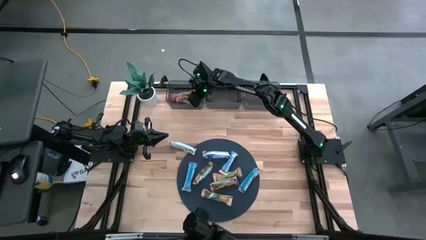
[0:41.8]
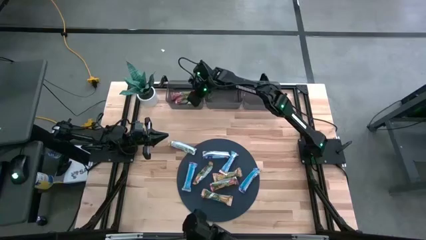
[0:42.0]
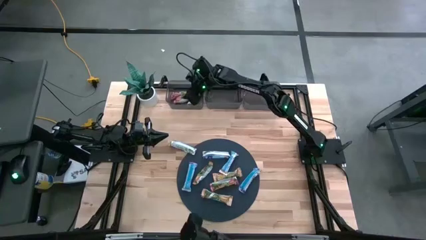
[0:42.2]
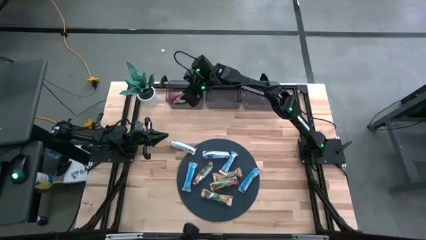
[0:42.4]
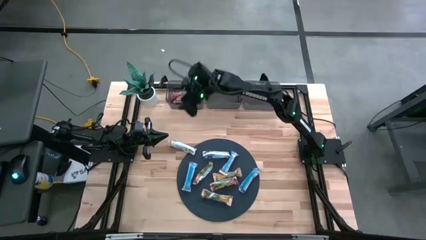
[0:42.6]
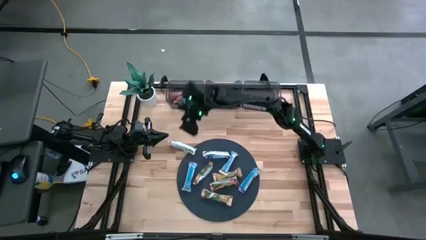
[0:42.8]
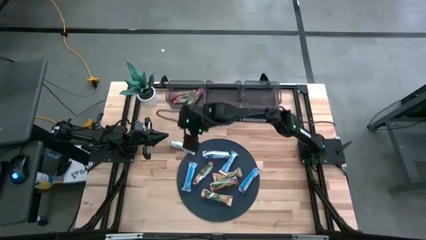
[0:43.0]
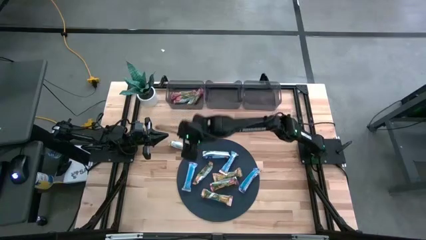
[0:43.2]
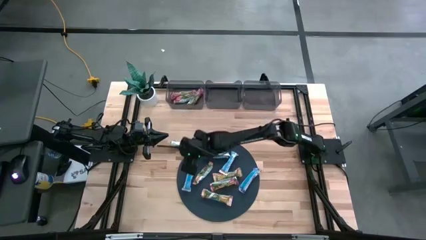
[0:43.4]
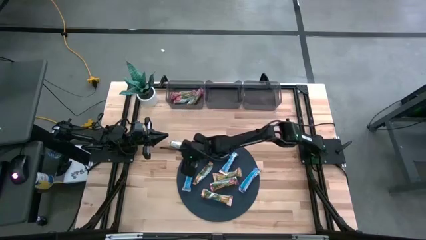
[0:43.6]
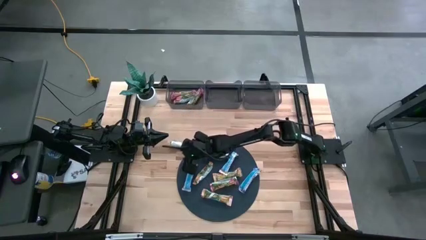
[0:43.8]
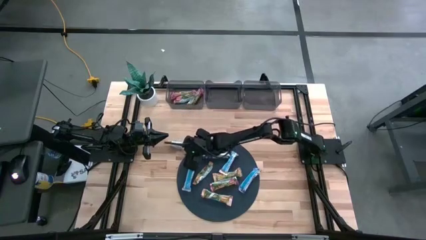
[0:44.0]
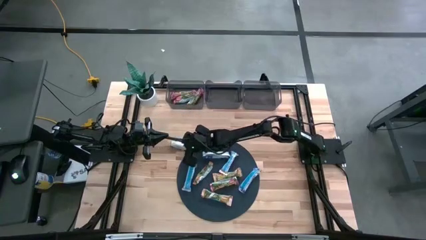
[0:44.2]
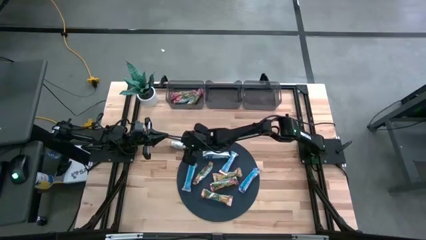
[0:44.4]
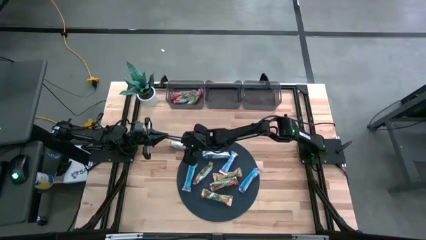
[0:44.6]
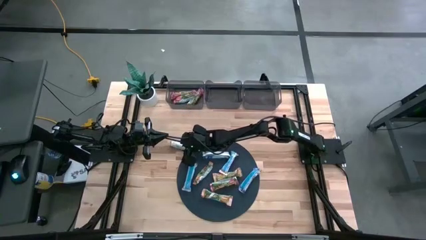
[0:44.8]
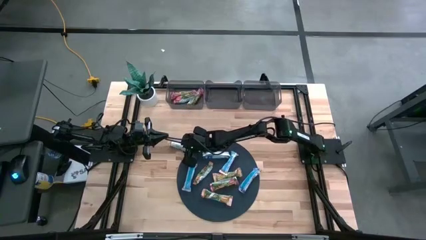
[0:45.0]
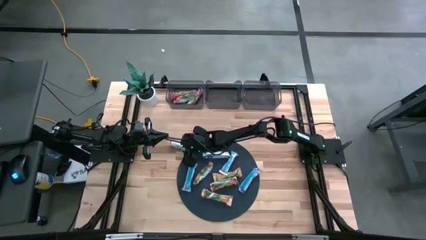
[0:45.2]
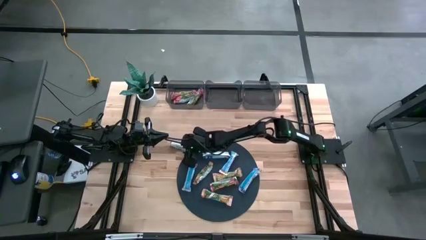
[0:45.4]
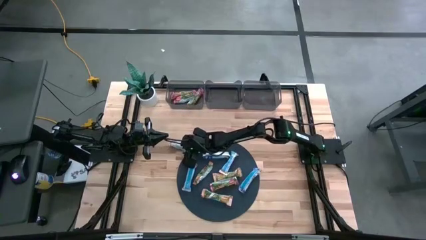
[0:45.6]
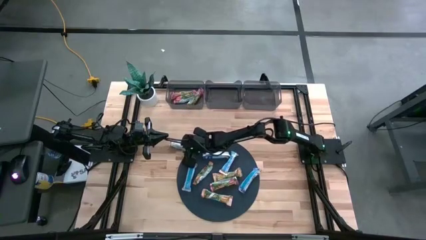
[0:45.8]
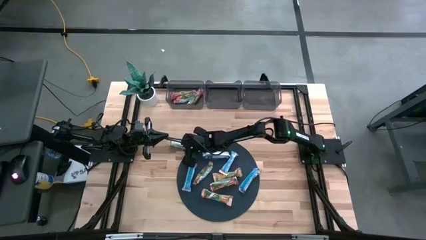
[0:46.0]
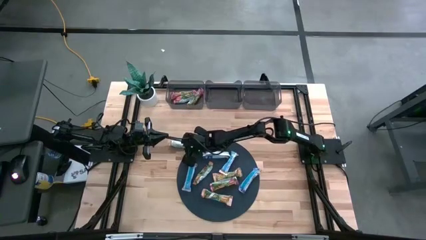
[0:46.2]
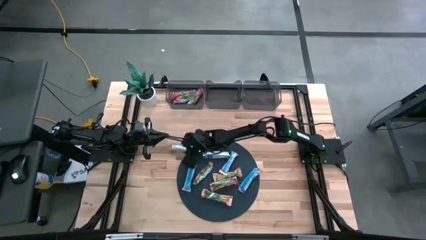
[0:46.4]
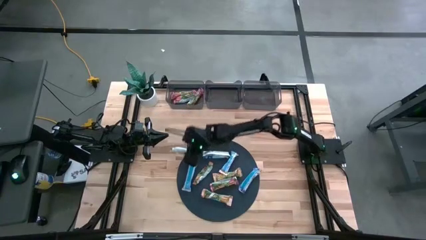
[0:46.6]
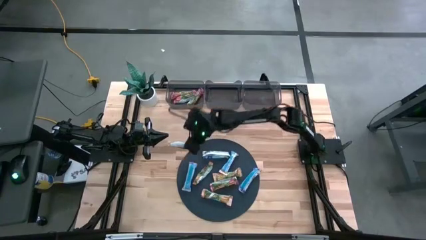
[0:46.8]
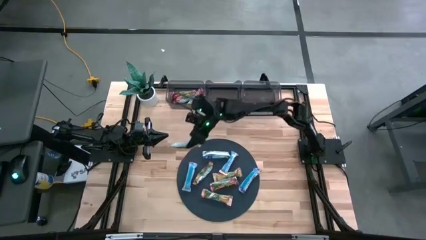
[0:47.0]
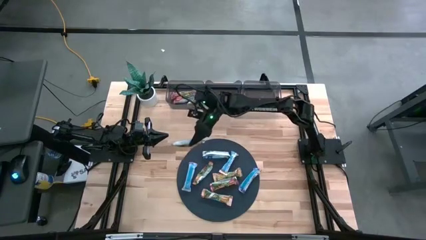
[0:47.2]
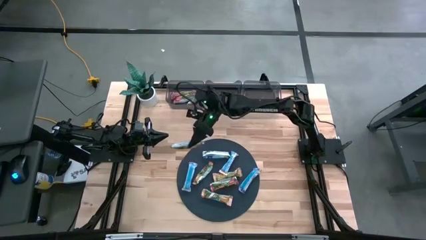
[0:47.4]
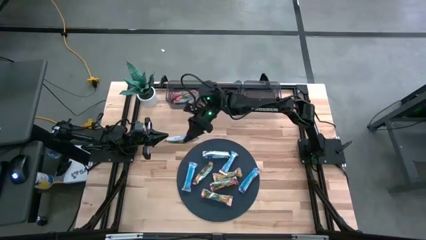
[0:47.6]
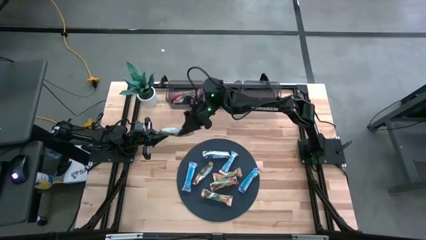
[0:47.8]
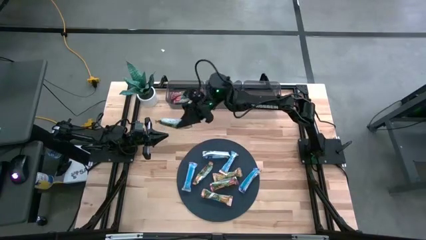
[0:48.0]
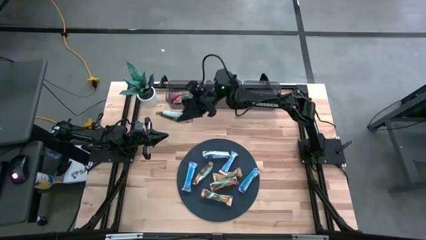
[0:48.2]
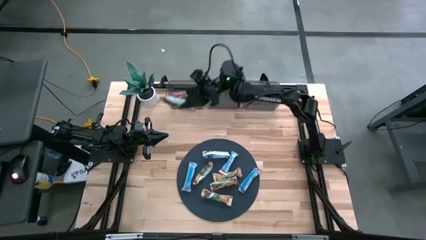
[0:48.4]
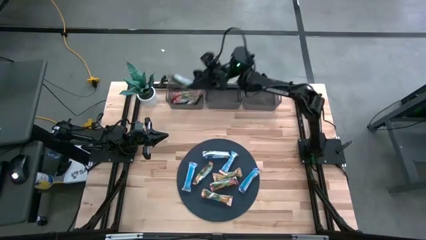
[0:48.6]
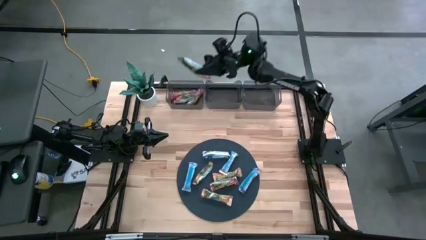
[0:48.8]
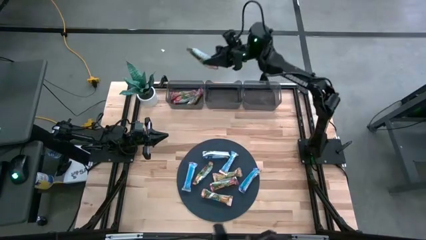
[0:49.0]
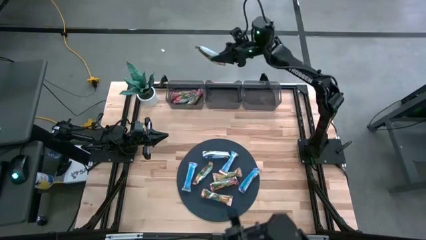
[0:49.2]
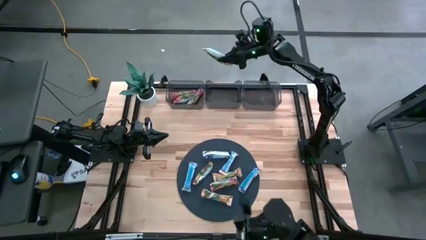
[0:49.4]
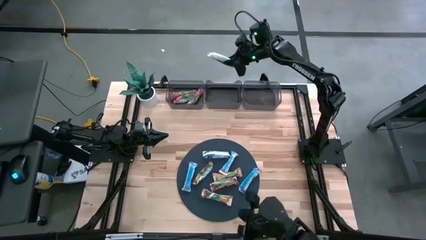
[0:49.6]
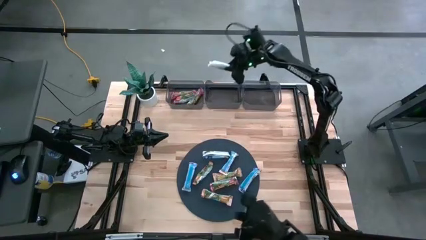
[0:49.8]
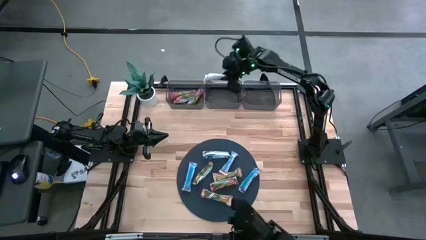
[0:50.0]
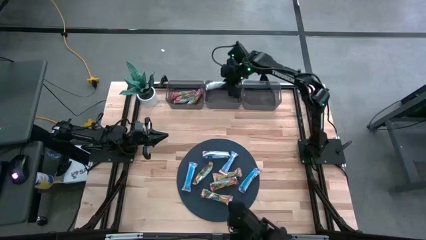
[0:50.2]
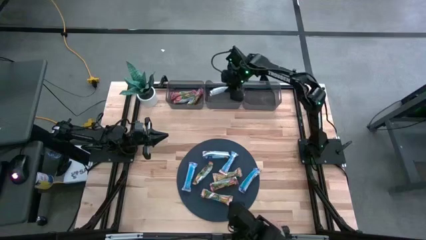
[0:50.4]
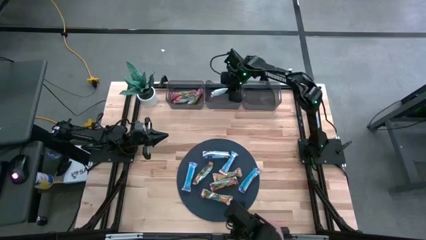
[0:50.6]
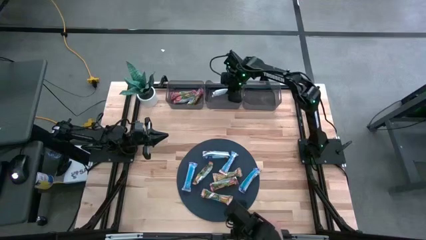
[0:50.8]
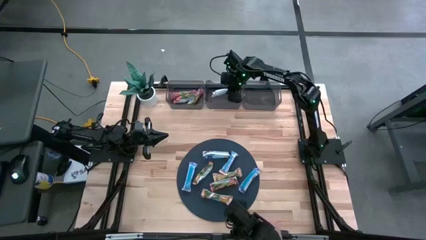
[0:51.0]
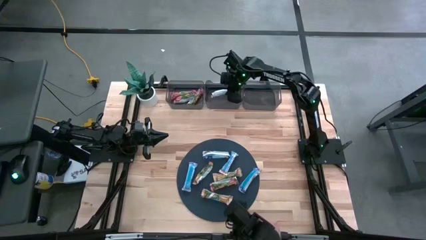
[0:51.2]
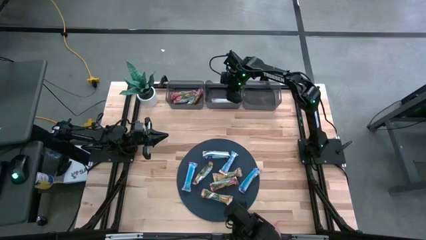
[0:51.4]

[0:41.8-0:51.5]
Task: Pick and place Granola Bars by type
Put the yellow granola bar into the middle black bin

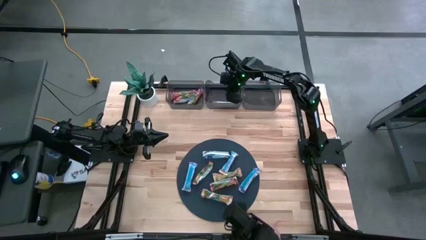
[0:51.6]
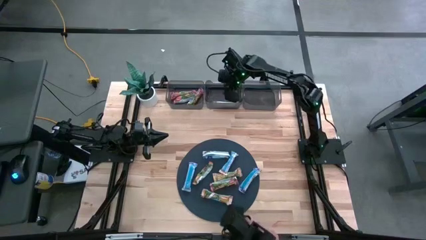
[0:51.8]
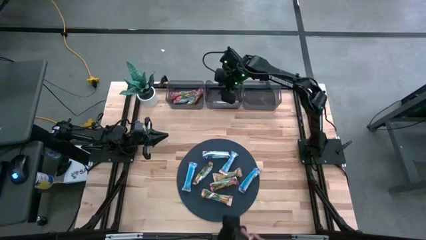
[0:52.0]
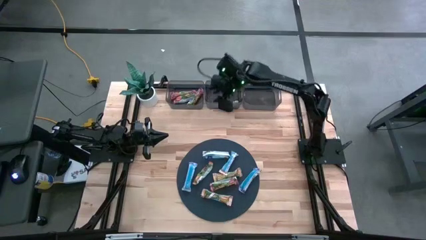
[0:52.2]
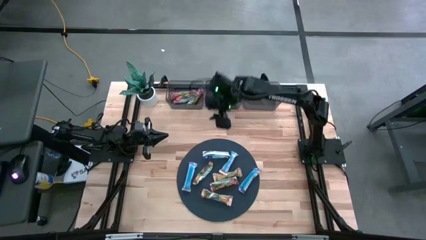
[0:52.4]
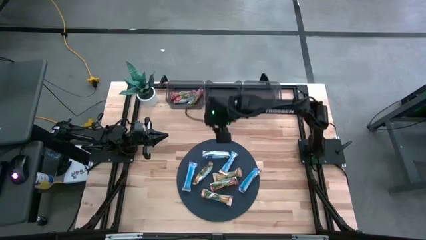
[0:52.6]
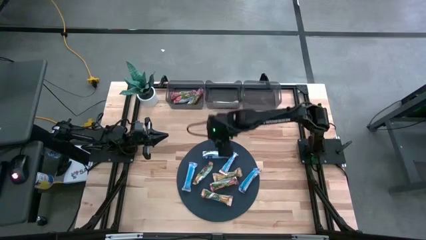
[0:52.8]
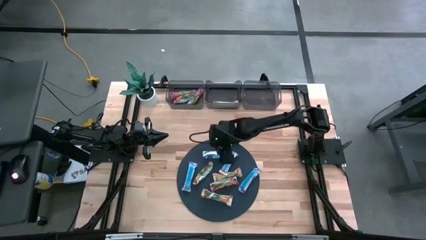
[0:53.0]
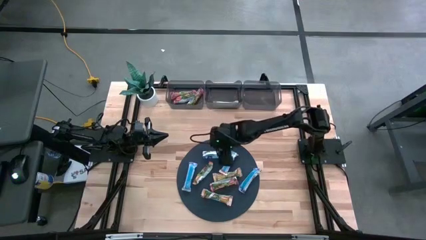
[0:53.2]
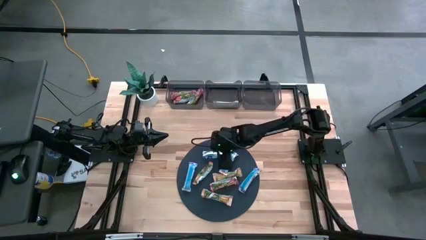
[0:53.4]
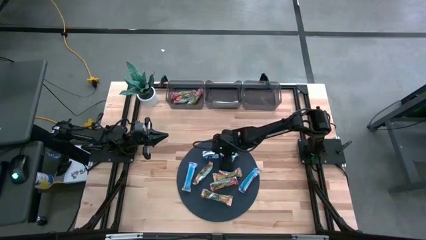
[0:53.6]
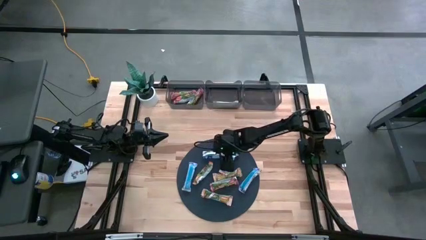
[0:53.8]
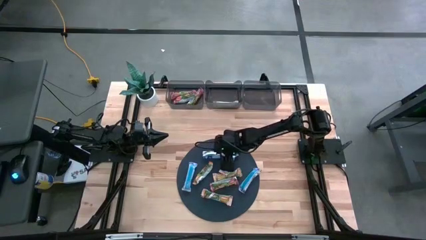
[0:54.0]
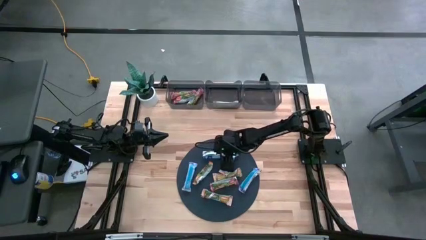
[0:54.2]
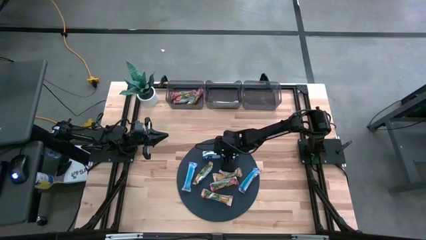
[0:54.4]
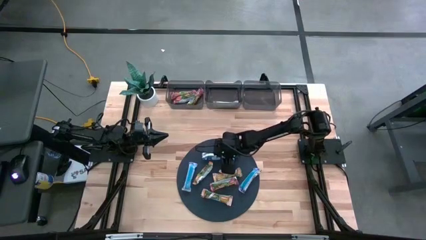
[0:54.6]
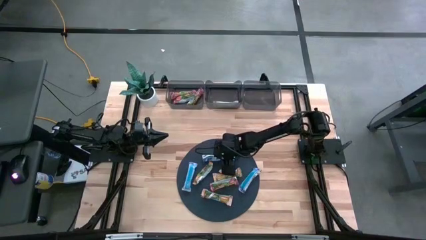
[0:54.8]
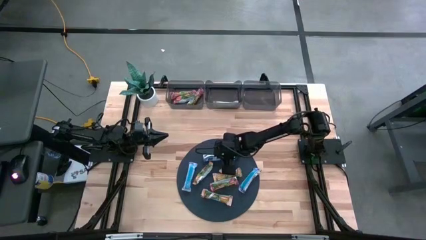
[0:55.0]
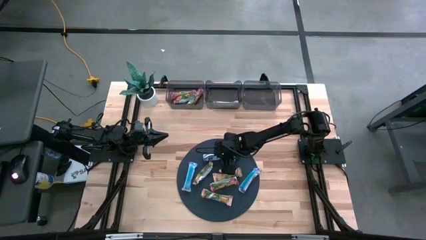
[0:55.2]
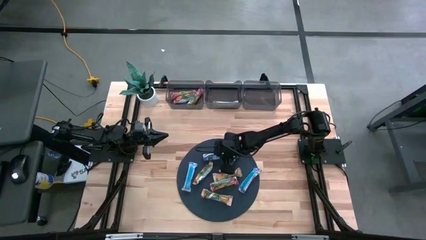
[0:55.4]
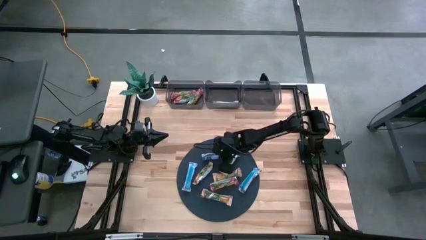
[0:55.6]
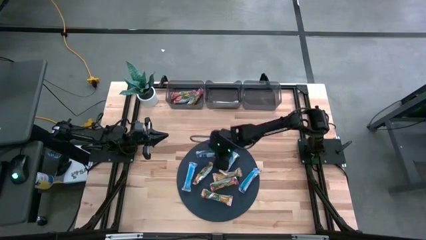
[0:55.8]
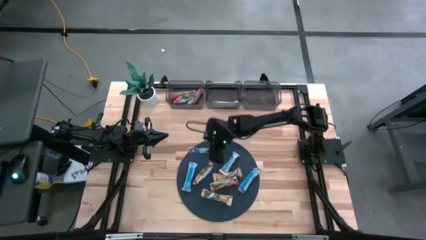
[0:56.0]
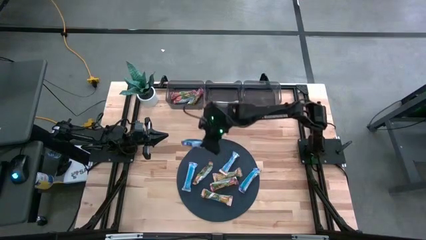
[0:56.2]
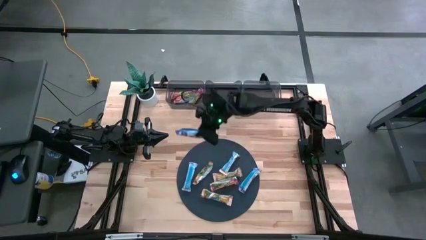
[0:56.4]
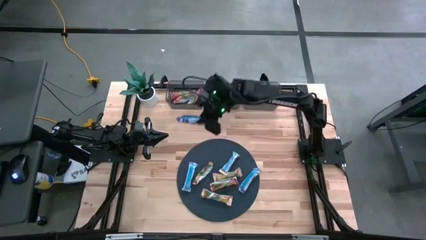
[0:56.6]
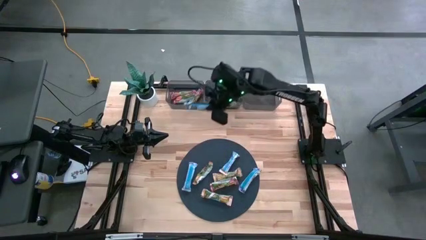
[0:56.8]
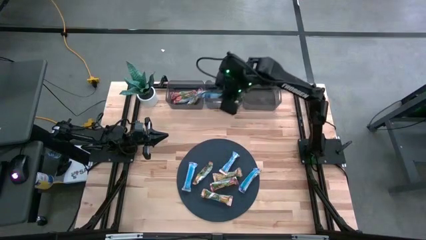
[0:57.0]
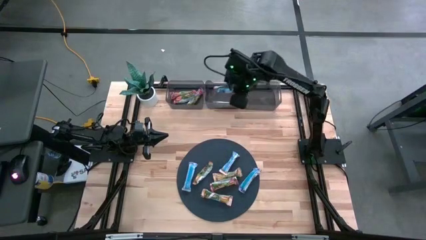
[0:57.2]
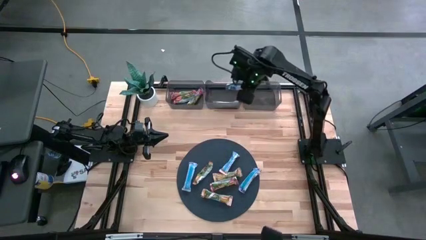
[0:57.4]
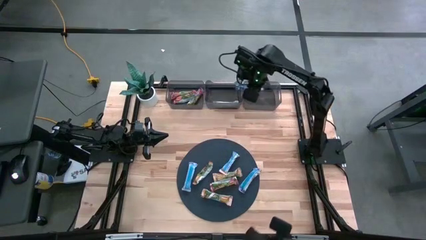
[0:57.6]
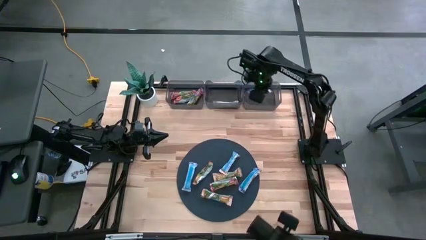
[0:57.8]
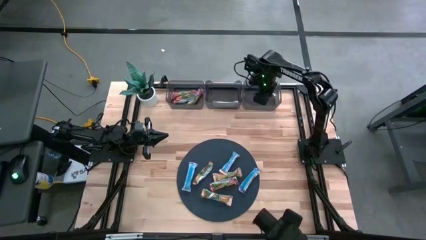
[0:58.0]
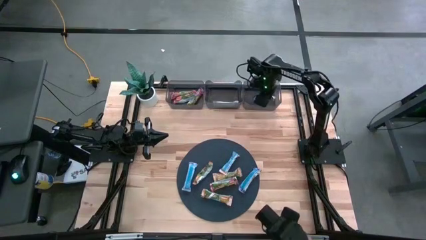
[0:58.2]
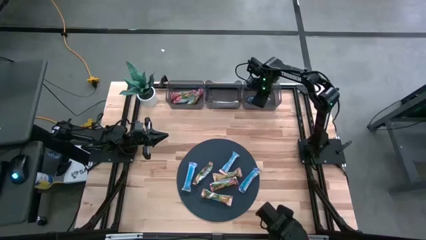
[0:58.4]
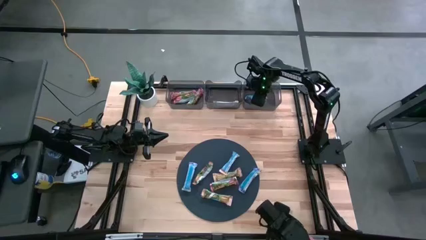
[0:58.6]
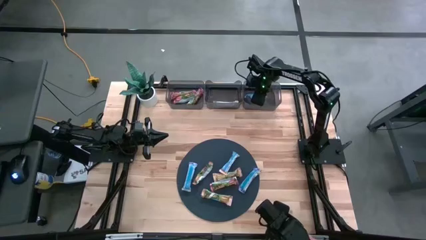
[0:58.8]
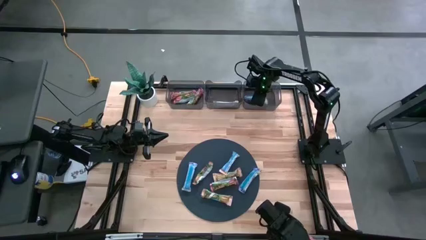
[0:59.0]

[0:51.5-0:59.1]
Put the blue granola bar into the right black bin
